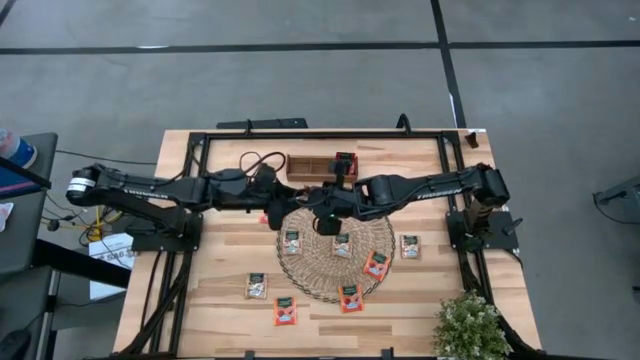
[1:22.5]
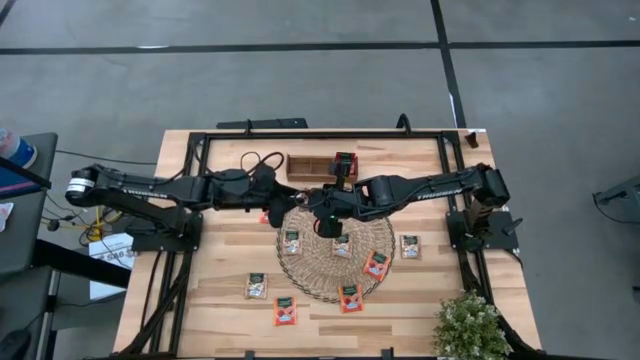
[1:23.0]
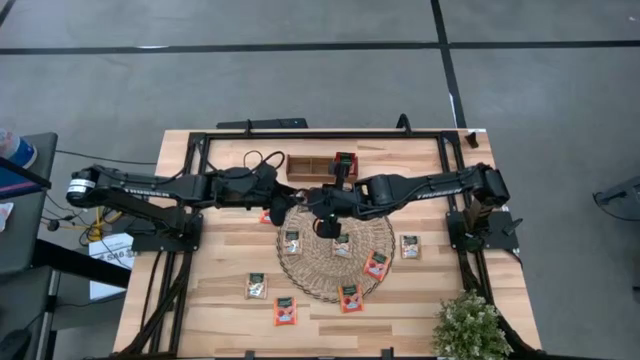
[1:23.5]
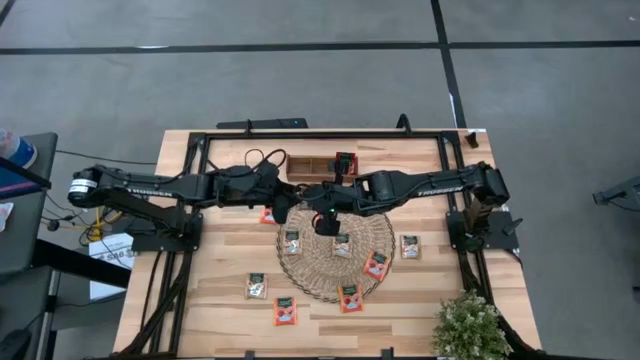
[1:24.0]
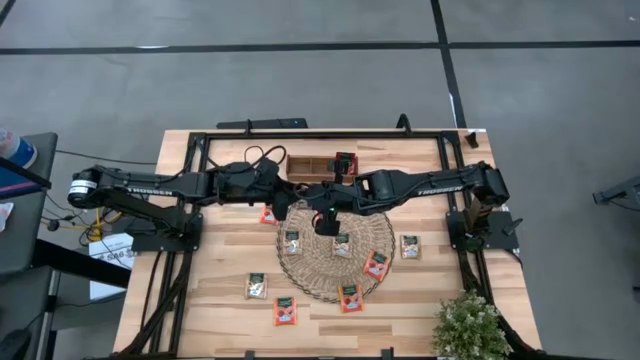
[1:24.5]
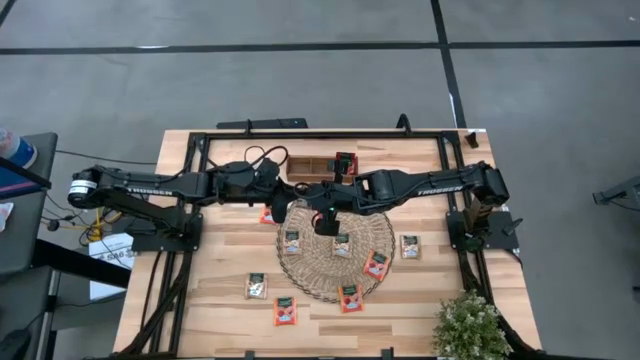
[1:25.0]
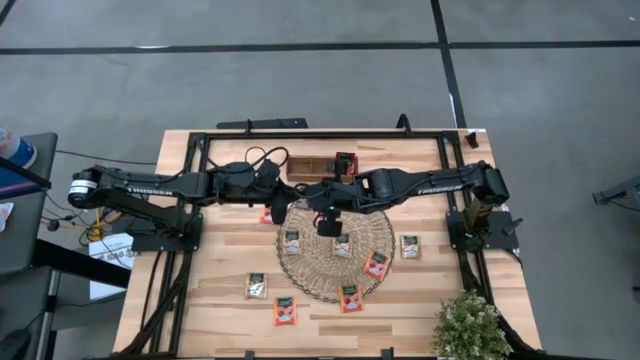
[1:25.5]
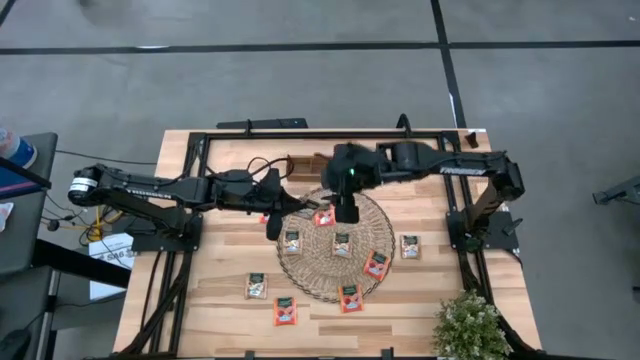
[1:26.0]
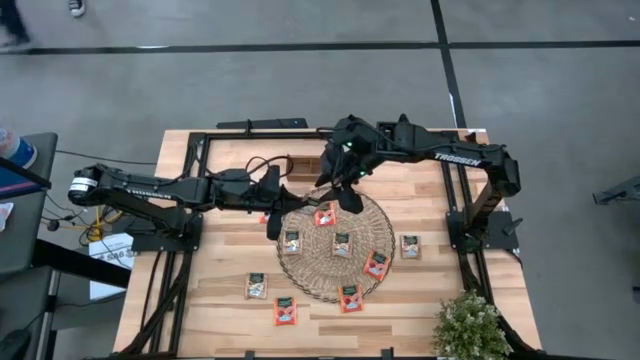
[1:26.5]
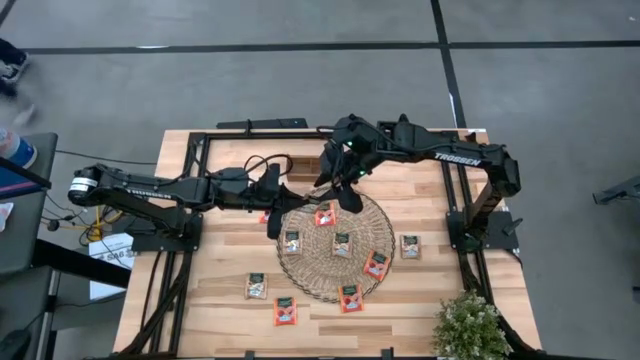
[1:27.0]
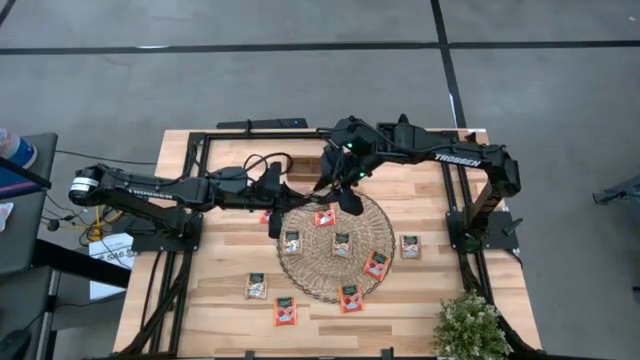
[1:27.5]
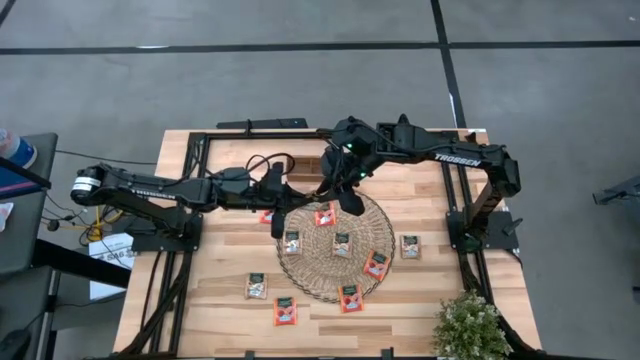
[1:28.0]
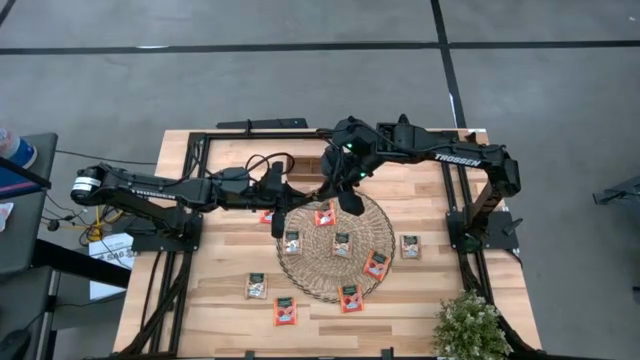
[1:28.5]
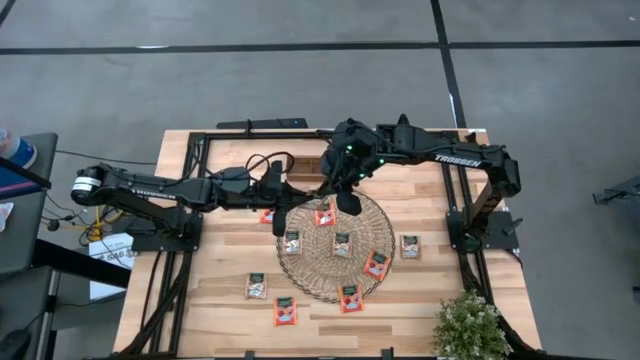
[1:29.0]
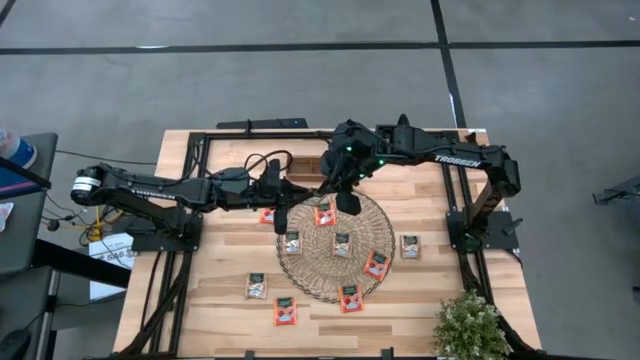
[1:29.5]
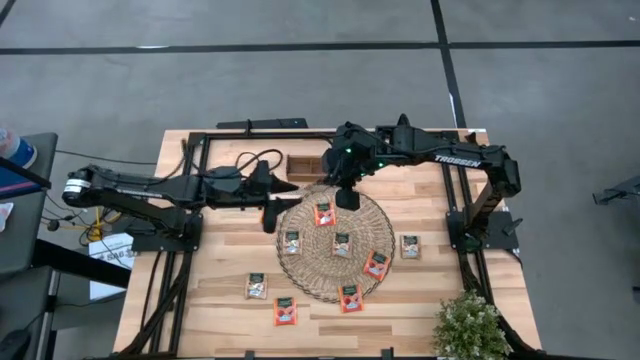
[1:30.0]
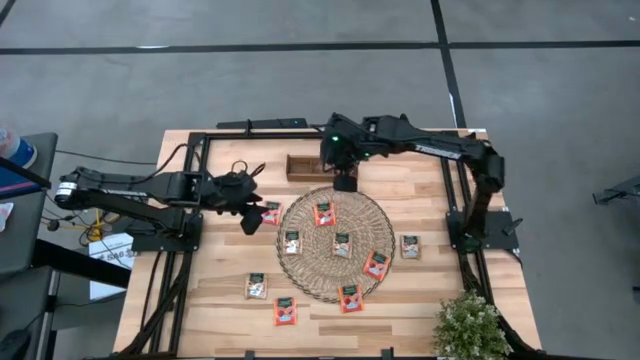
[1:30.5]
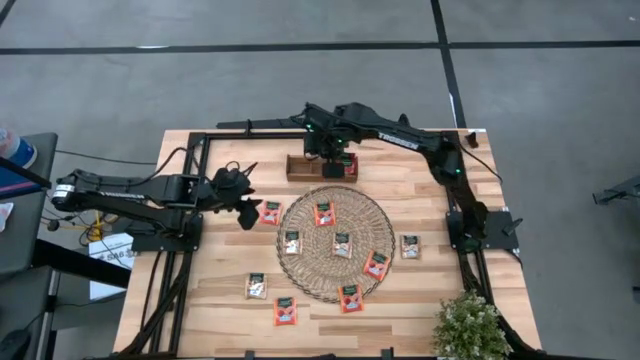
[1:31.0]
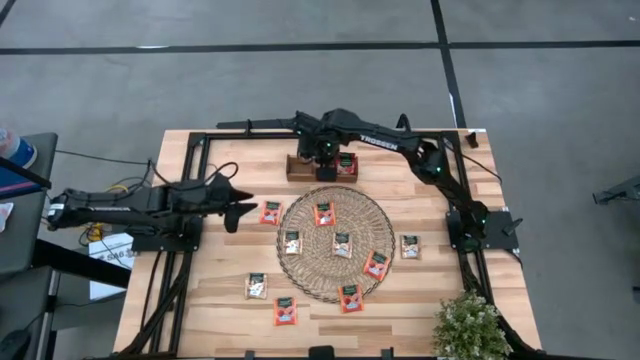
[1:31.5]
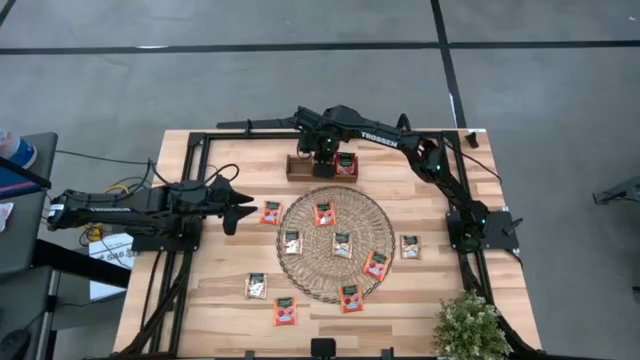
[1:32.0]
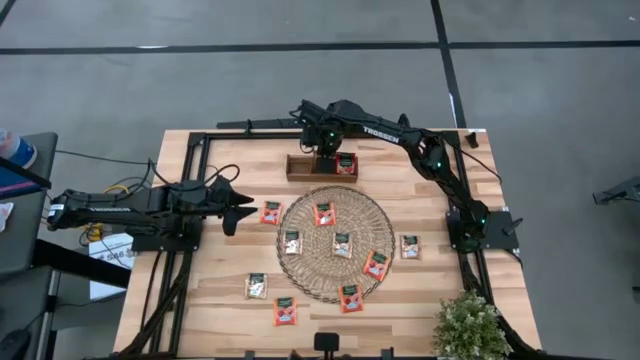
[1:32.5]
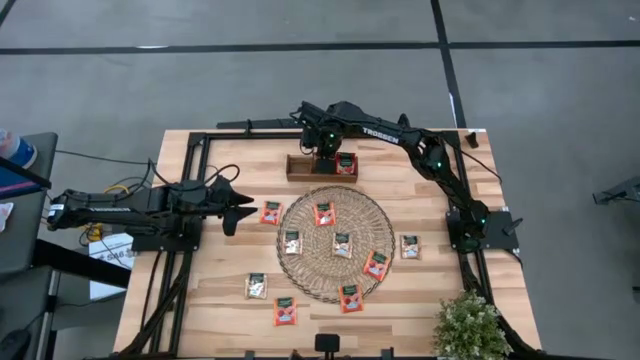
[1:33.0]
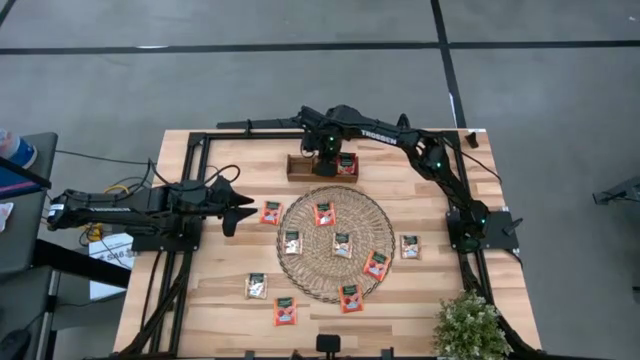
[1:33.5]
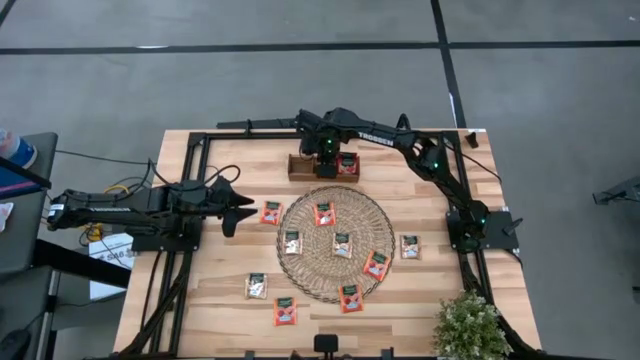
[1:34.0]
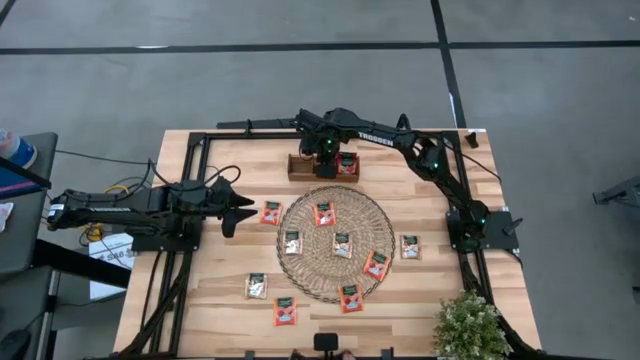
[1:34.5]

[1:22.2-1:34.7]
Task: Pick & Place Tea
Put the brown tea bag into the middle section of the brown wooden organizer

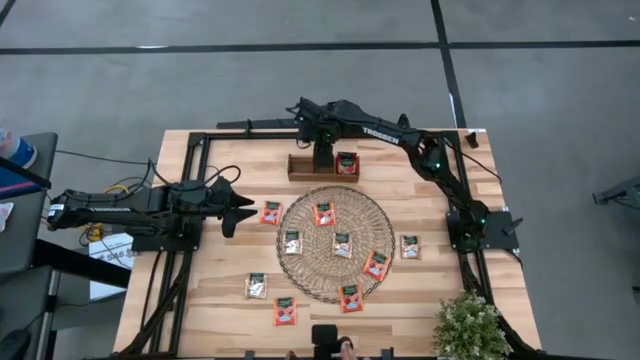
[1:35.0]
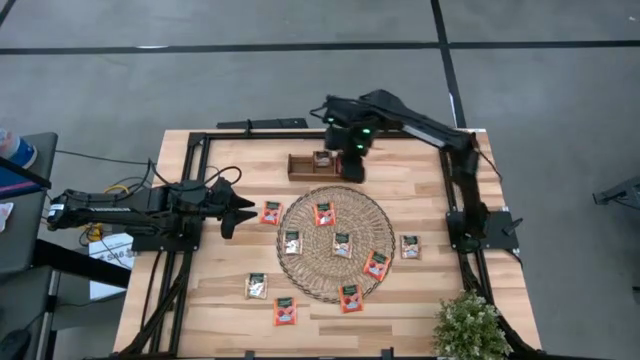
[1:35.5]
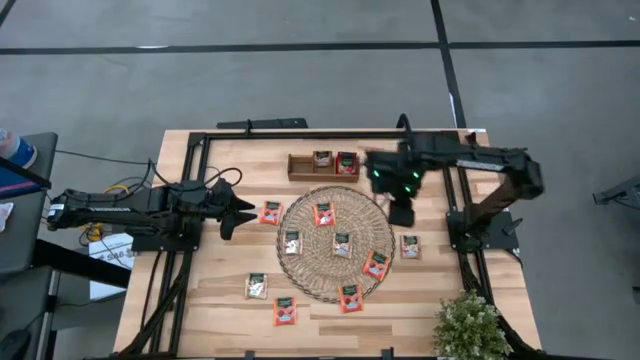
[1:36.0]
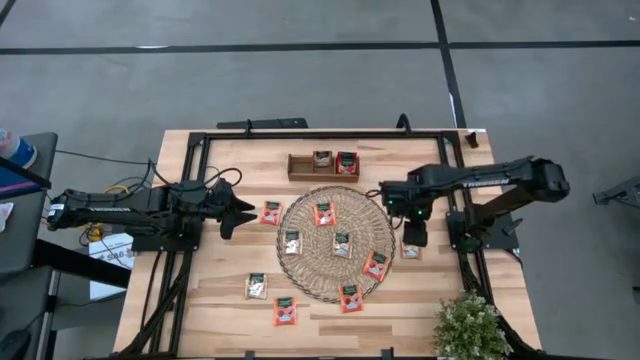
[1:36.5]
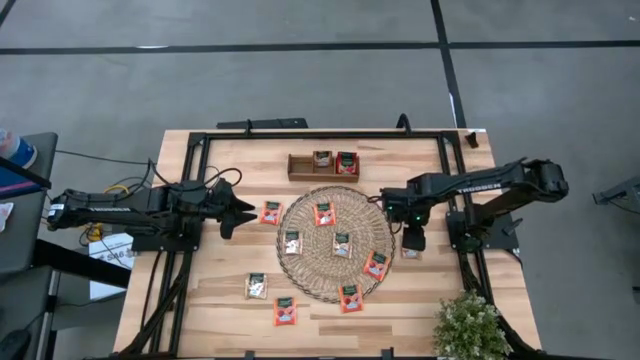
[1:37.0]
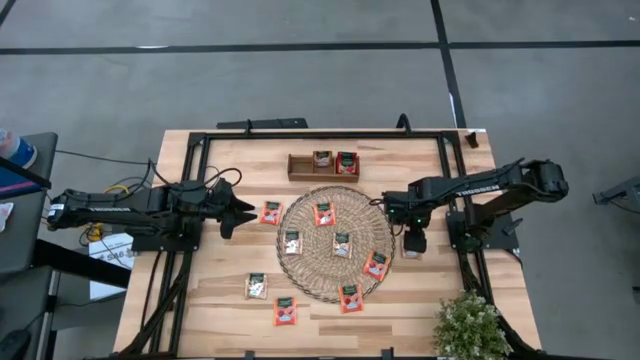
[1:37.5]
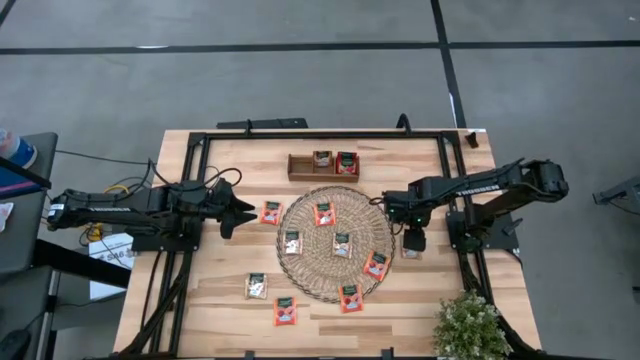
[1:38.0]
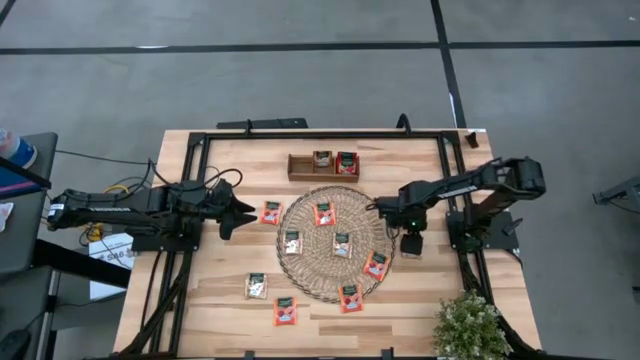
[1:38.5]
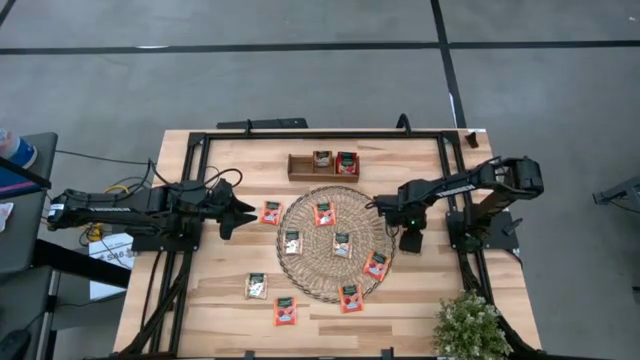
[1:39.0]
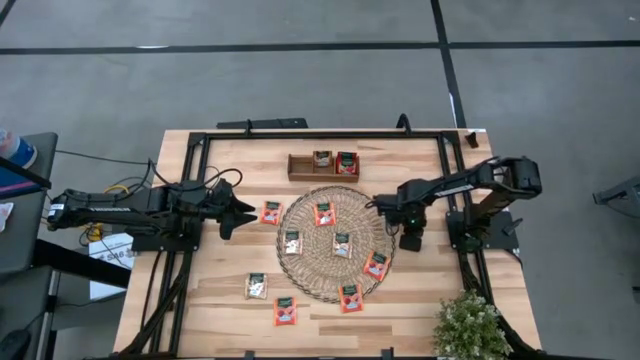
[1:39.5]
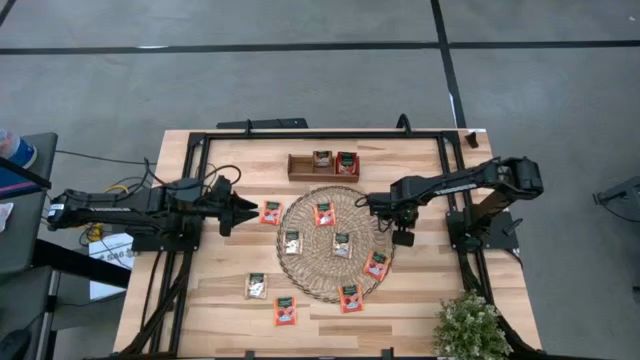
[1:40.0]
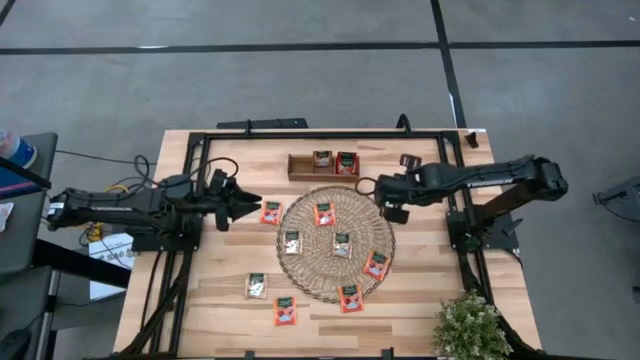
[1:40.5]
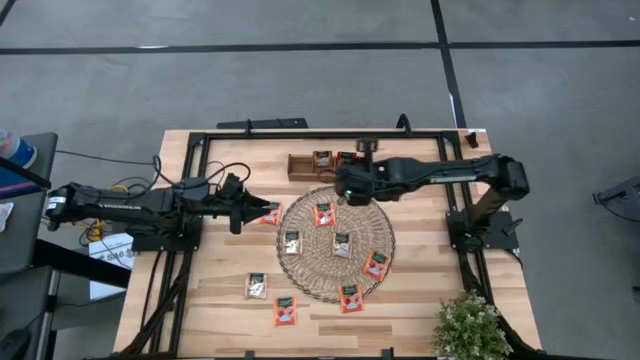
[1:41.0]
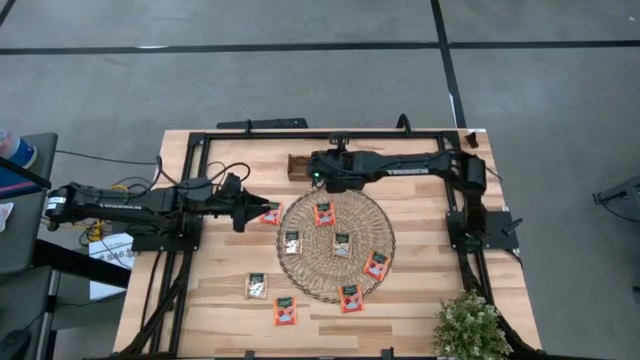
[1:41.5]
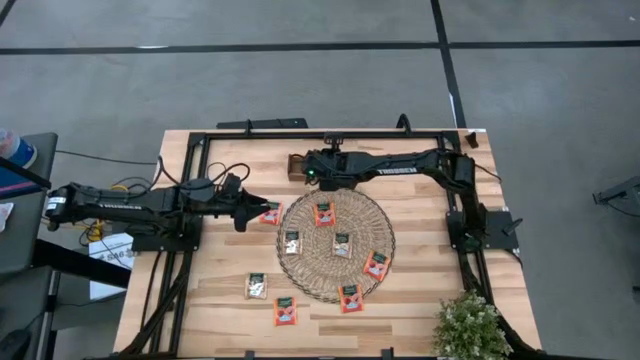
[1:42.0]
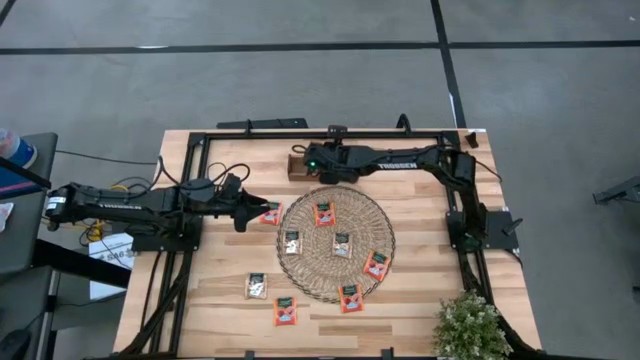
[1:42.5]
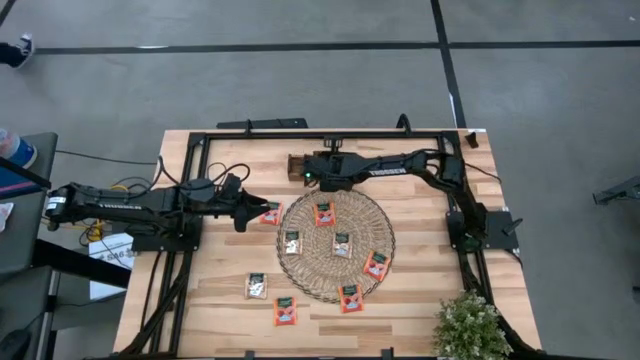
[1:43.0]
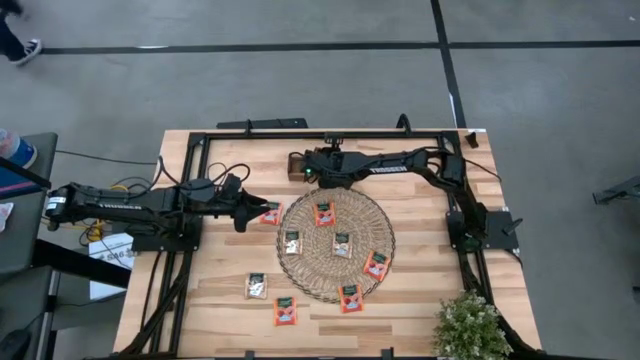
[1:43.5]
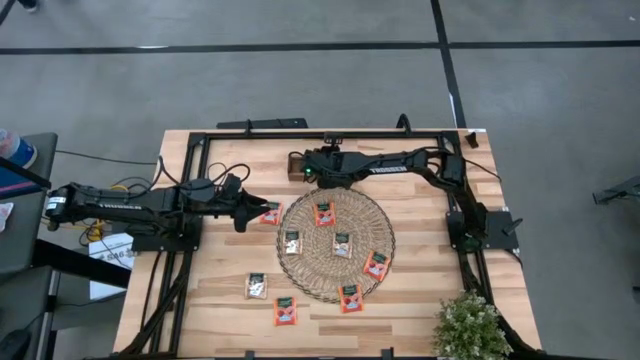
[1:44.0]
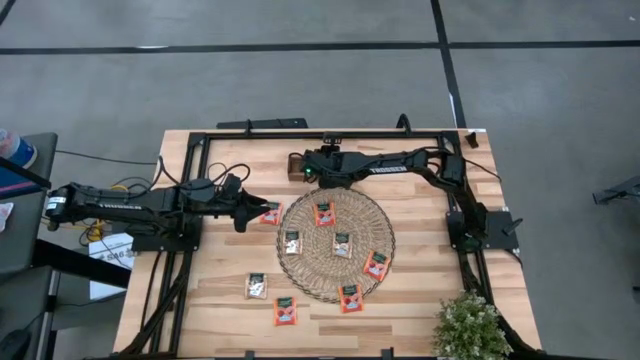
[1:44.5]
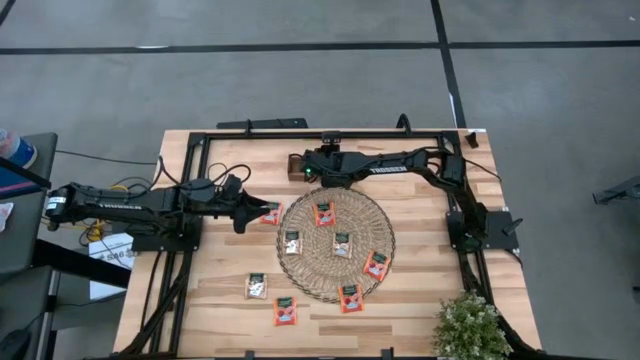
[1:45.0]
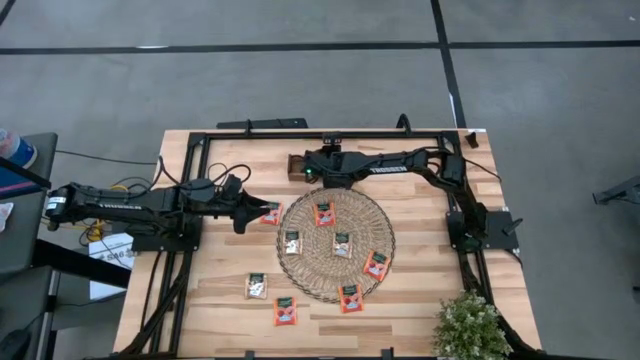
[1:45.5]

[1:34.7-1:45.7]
Put the brown tea bag into the middle section of the brown wooden organizer
